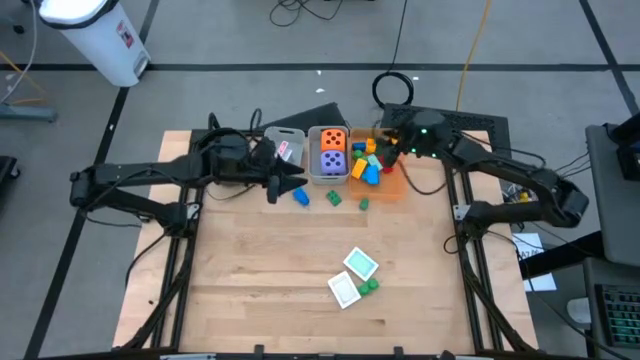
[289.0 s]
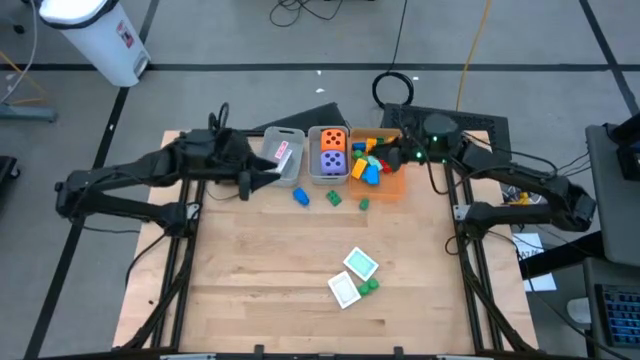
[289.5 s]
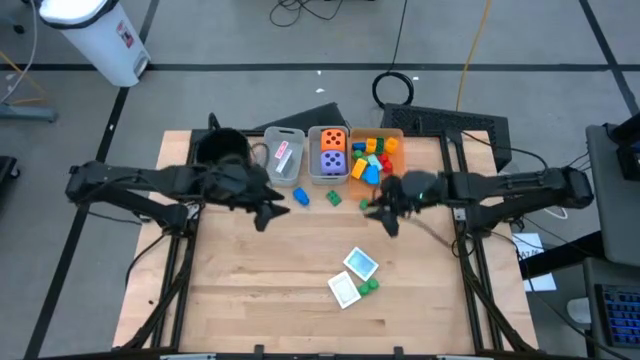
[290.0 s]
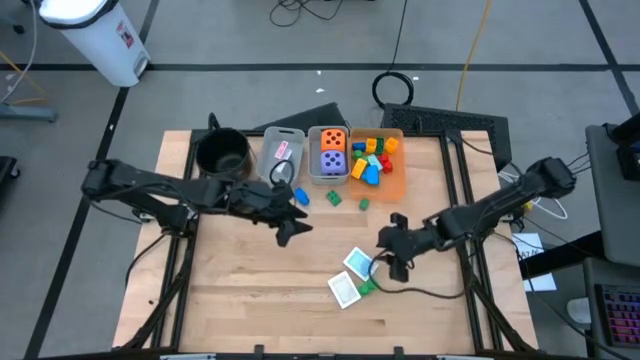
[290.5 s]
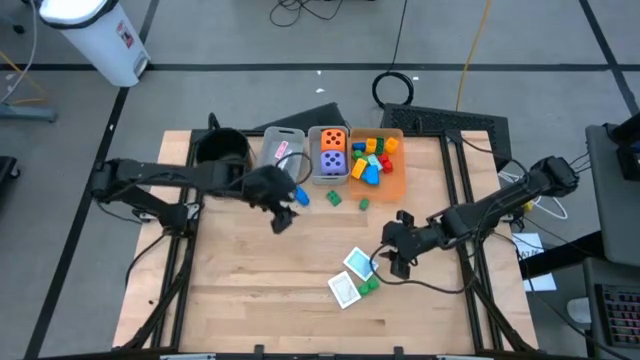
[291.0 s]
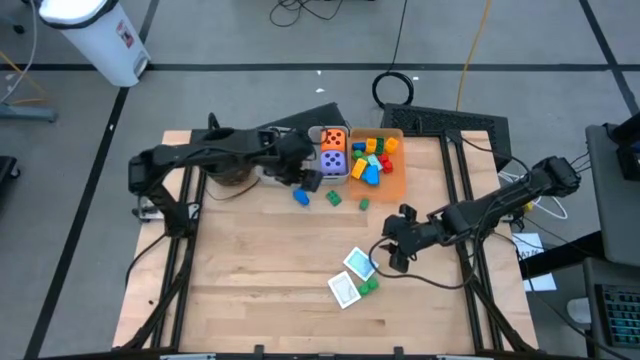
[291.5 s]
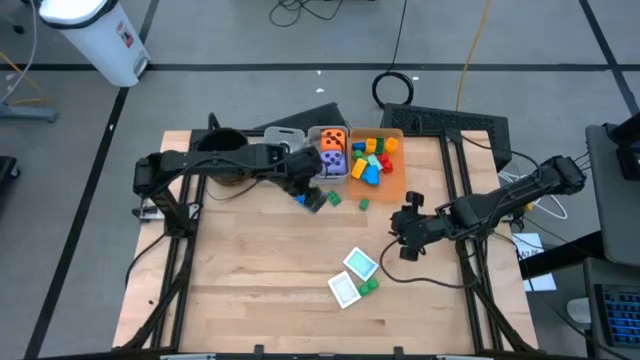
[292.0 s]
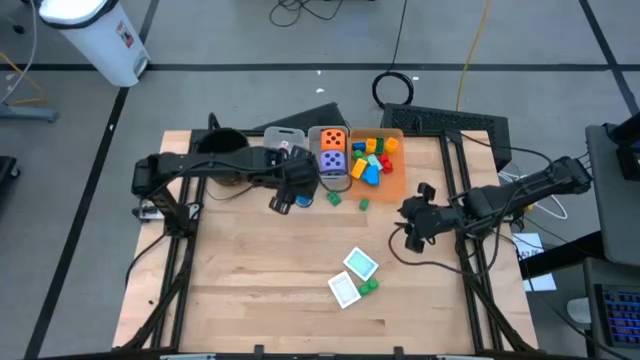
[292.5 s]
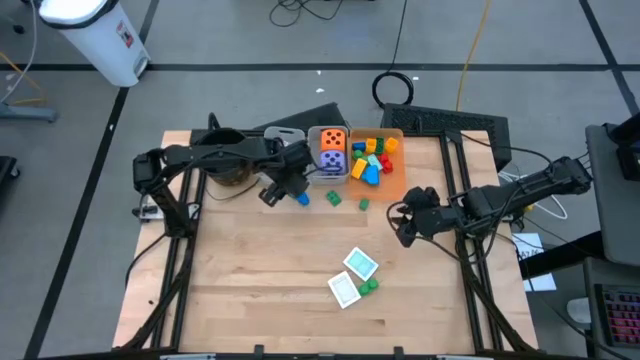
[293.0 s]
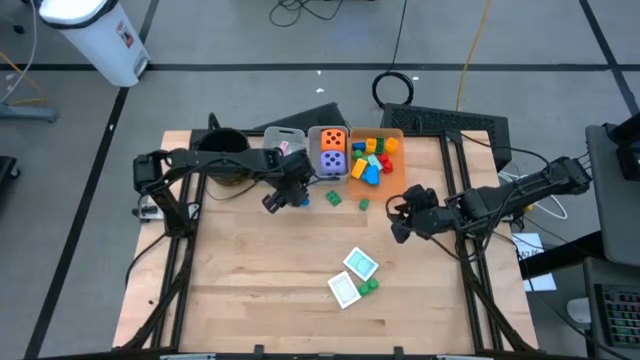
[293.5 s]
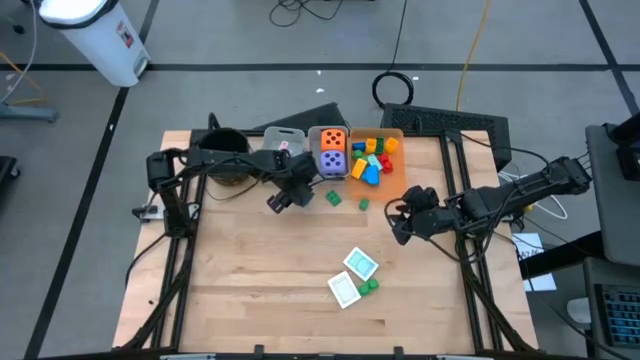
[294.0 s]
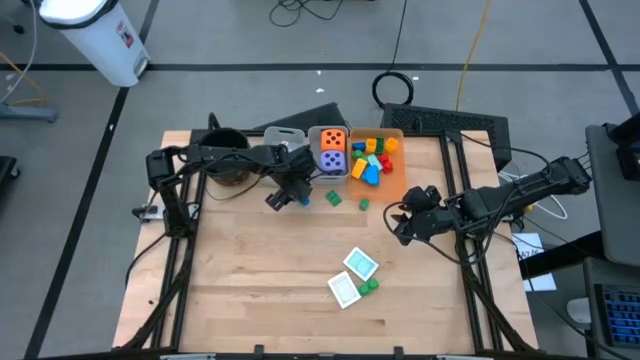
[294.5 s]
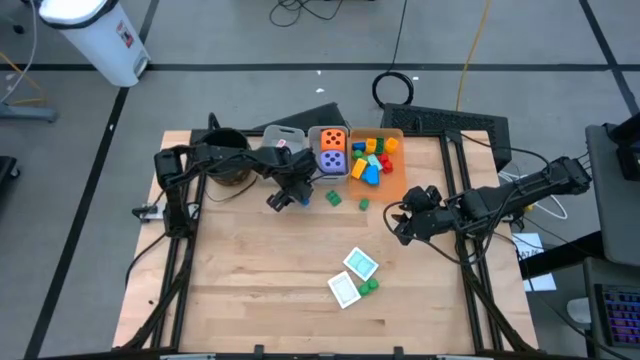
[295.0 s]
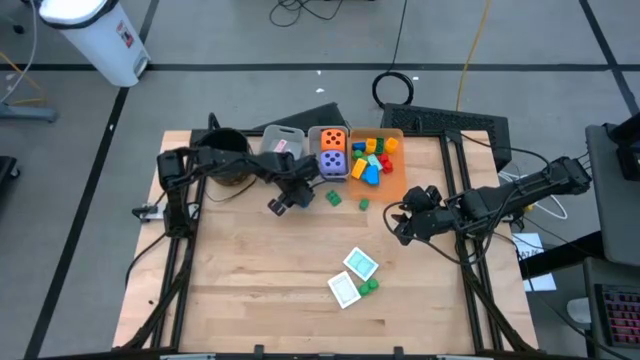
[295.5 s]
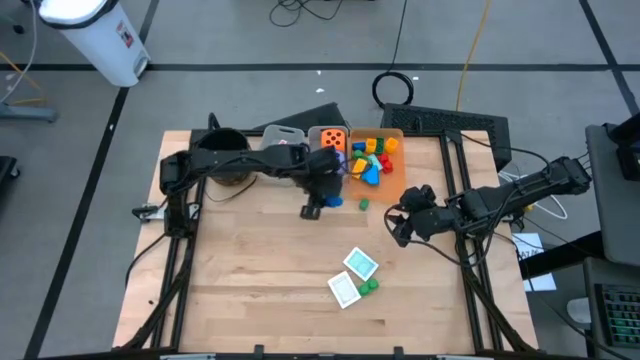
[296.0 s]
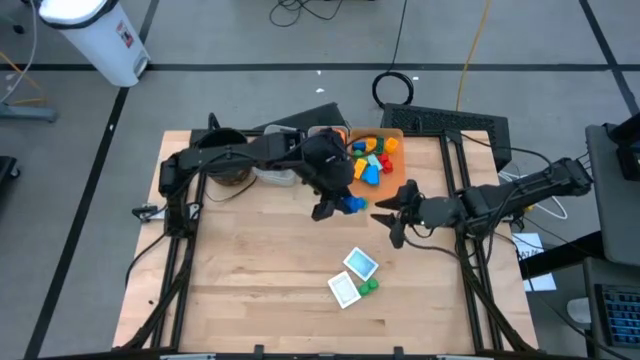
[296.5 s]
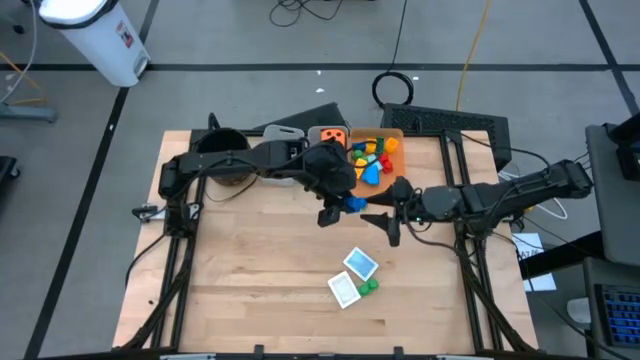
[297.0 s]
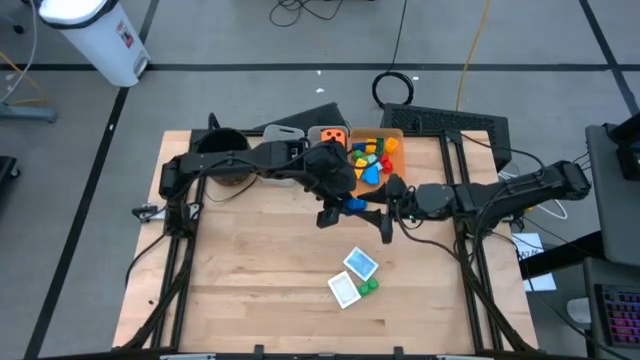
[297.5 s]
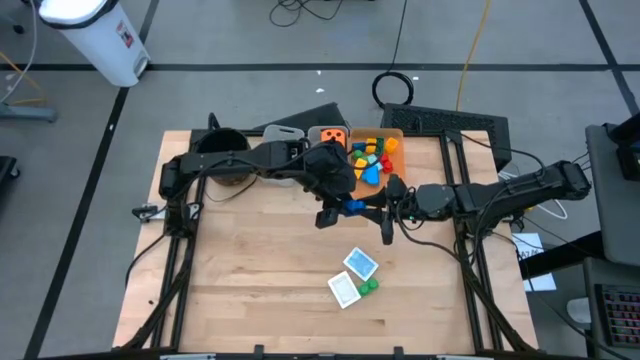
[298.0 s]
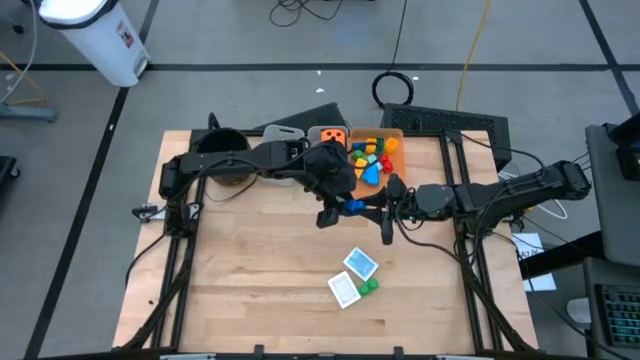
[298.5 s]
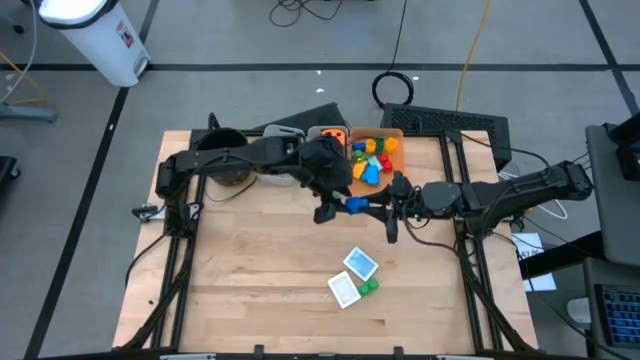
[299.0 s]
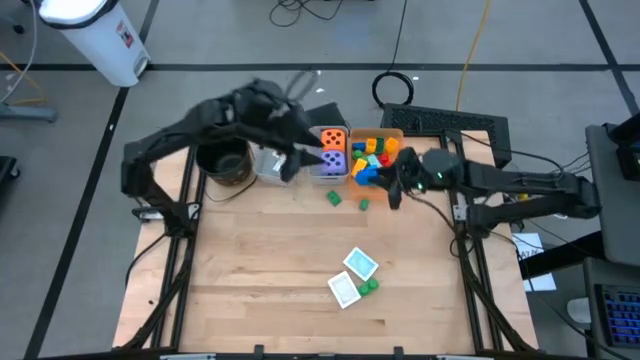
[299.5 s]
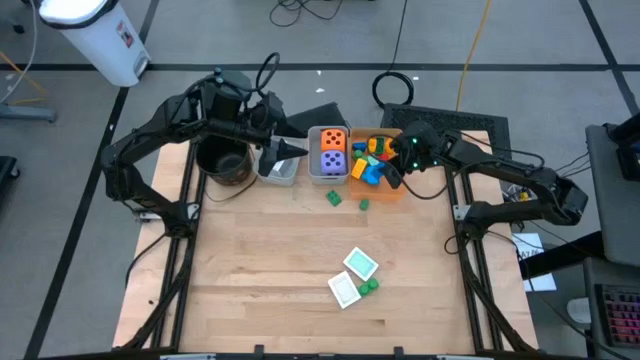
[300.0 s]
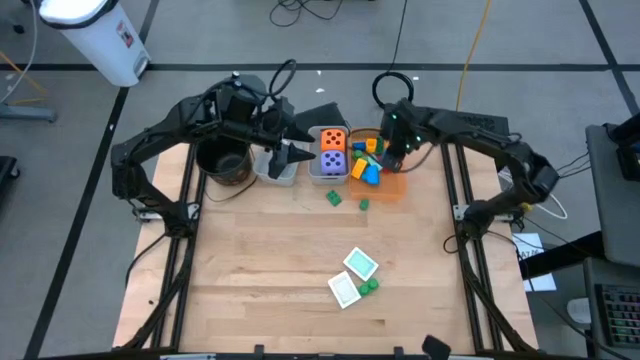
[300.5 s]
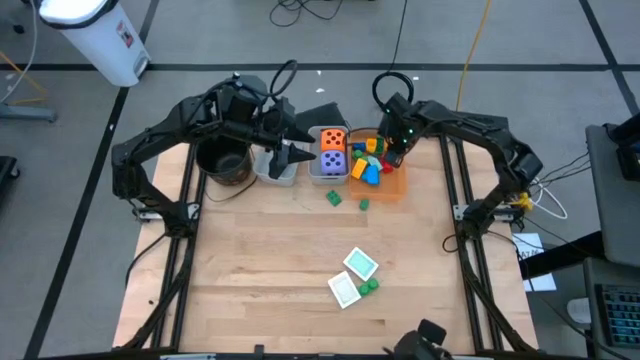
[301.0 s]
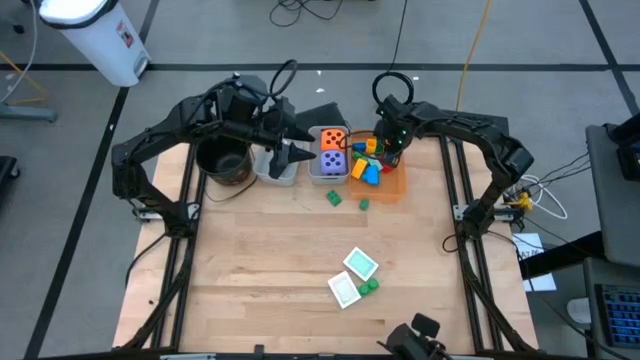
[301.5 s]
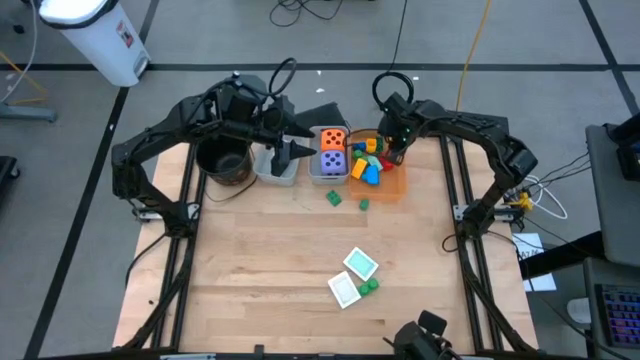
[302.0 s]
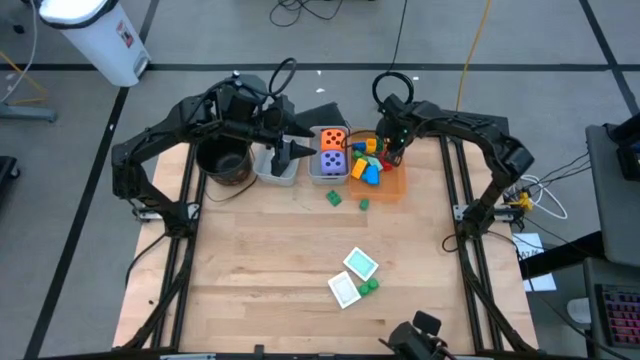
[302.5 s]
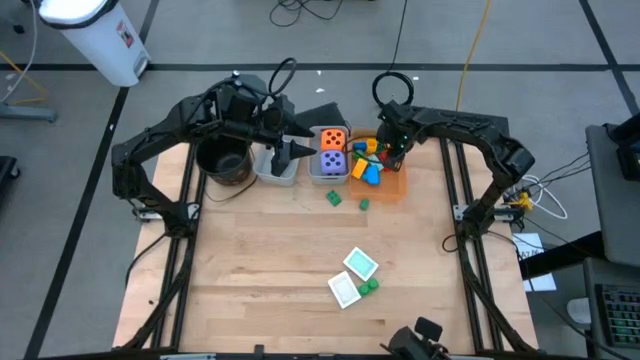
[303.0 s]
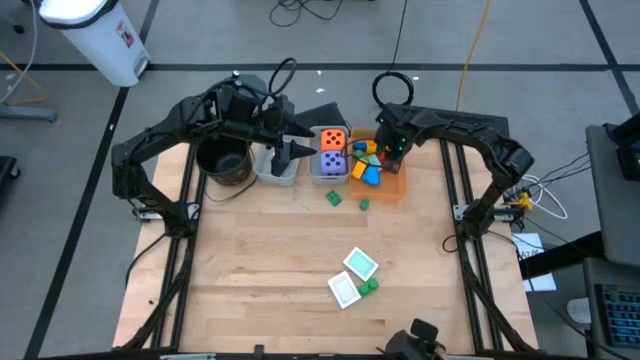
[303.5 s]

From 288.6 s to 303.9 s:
Task: Pick & Place Toys
Put the blue game piece into the orange bin

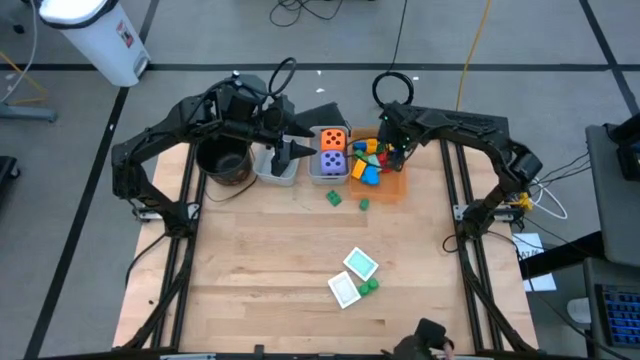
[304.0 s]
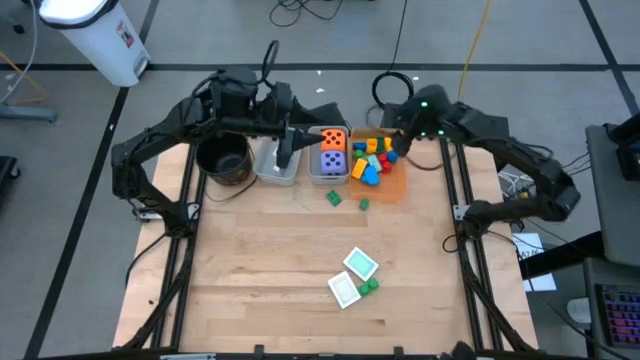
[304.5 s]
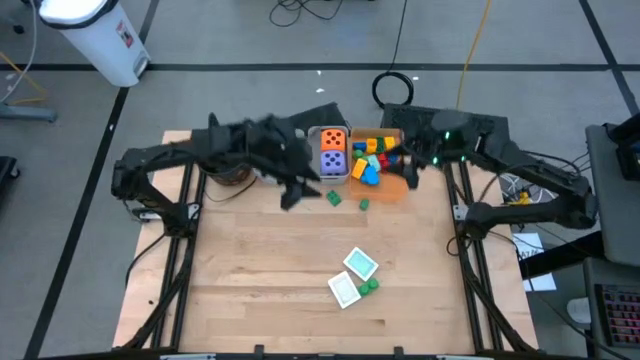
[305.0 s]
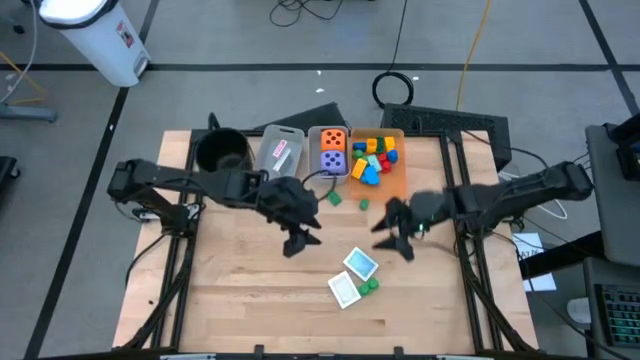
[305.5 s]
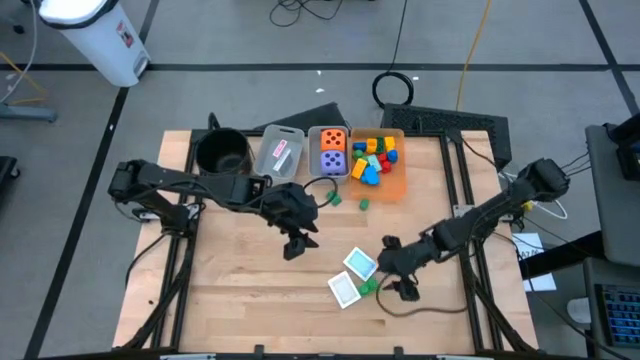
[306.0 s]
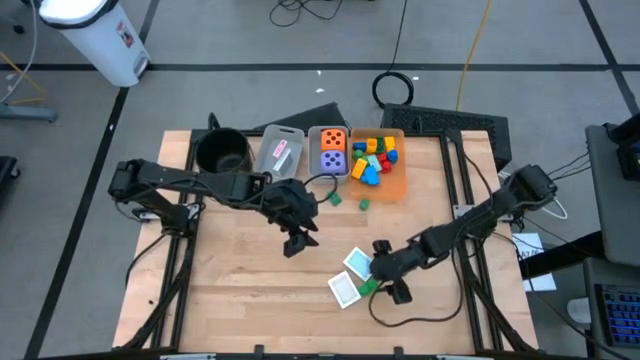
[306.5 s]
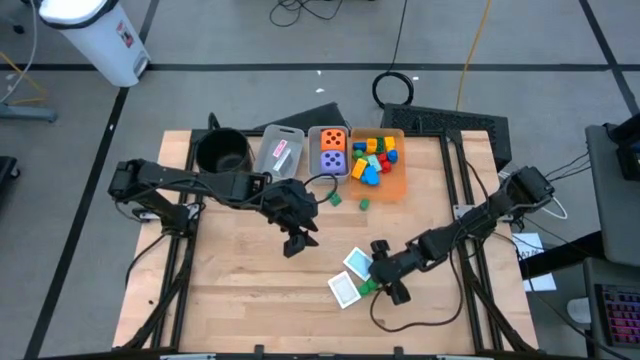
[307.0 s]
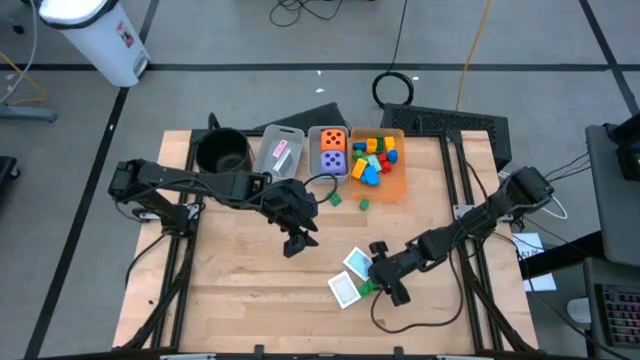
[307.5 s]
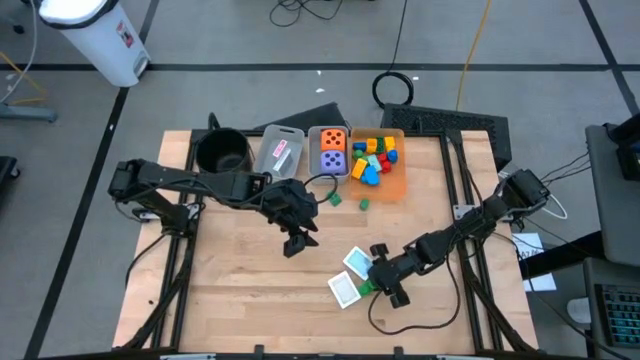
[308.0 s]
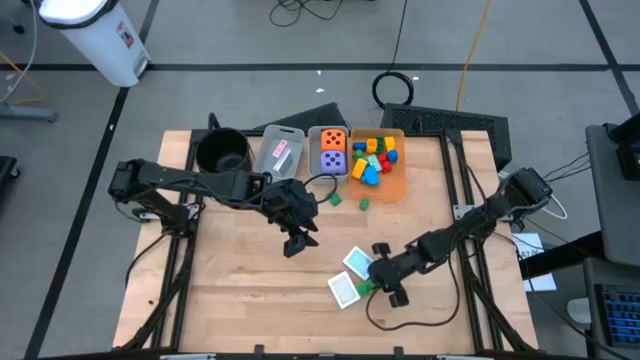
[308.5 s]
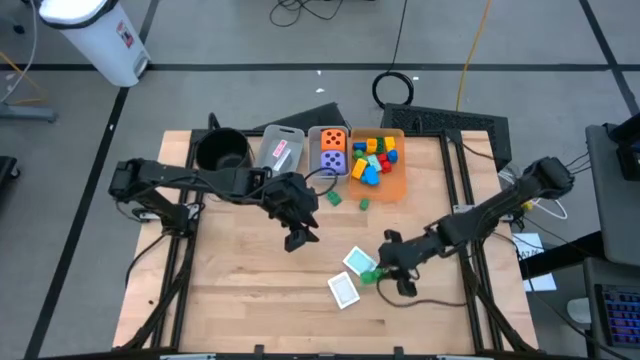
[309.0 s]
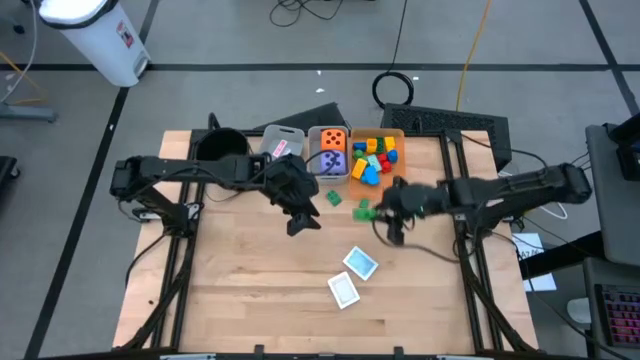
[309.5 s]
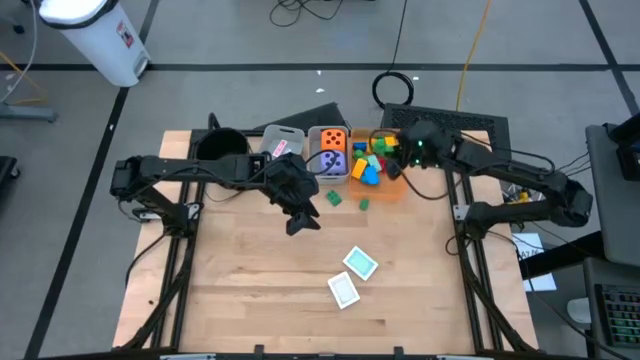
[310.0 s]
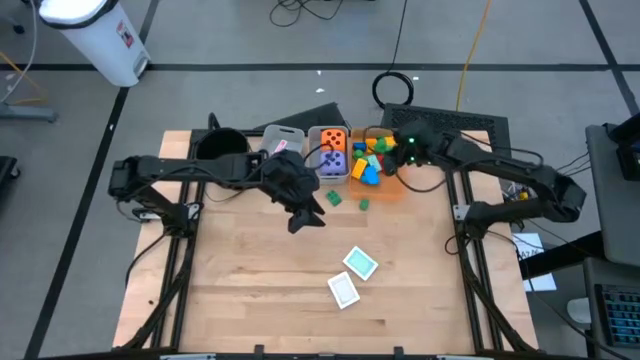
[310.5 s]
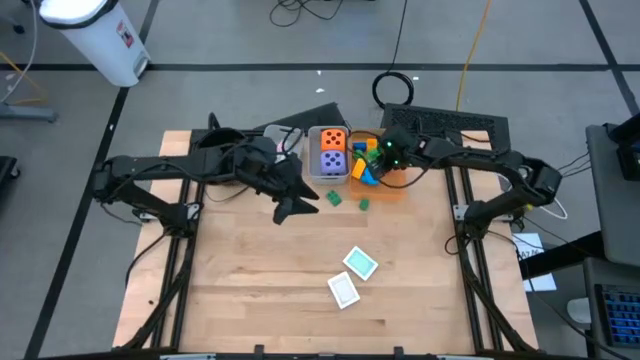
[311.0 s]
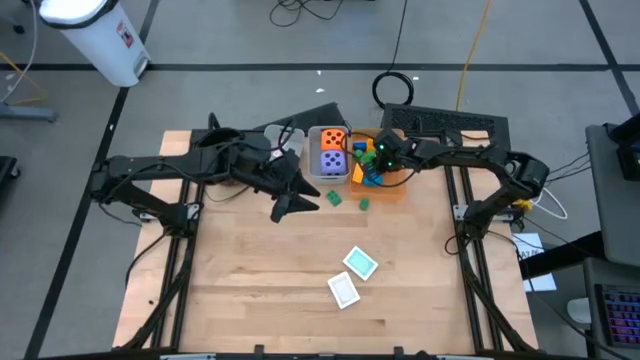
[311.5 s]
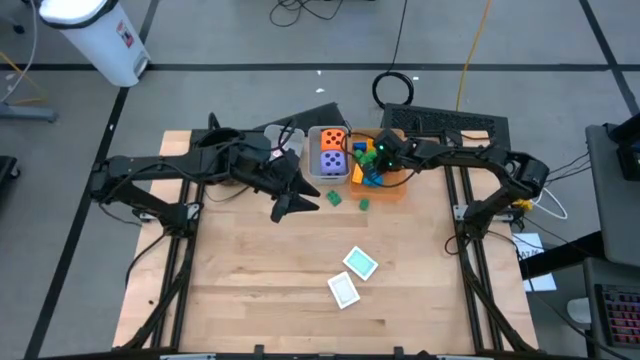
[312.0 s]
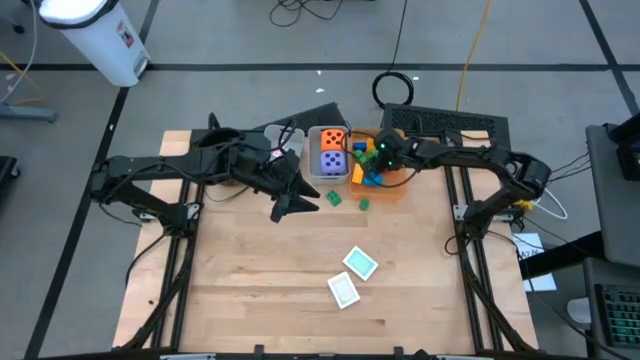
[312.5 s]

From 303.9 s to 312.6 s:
Put the light green game piece into the orange bin
